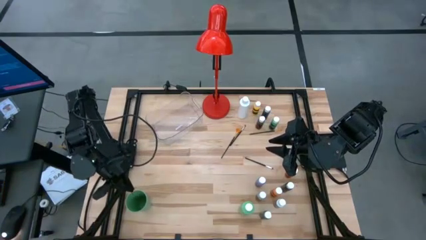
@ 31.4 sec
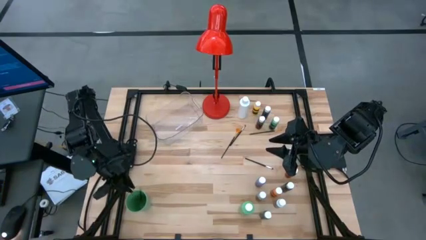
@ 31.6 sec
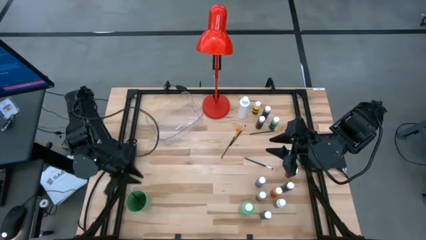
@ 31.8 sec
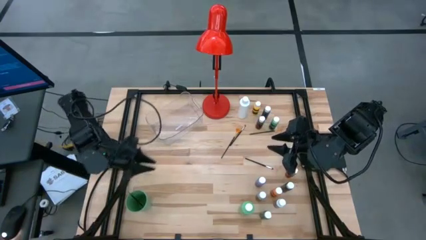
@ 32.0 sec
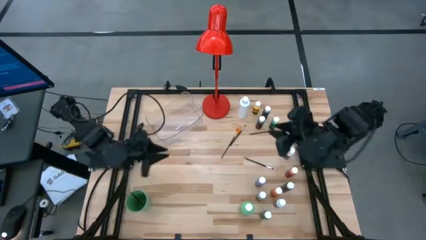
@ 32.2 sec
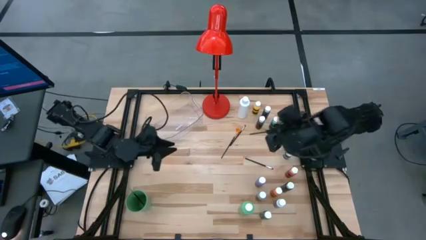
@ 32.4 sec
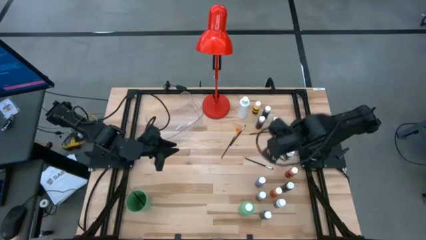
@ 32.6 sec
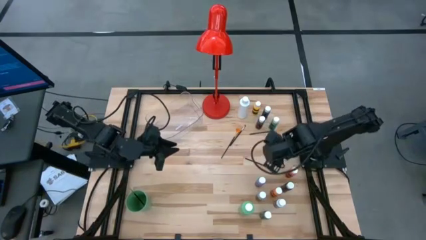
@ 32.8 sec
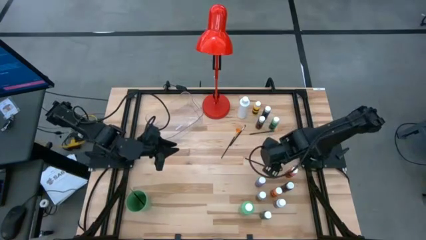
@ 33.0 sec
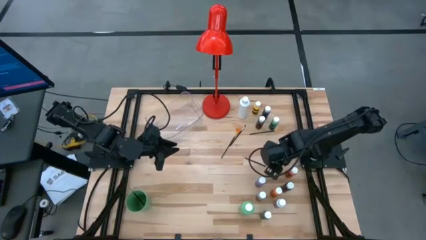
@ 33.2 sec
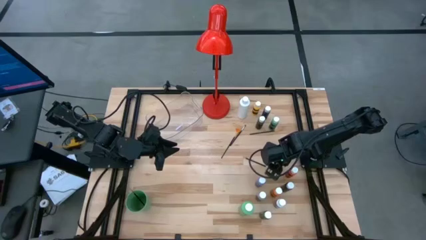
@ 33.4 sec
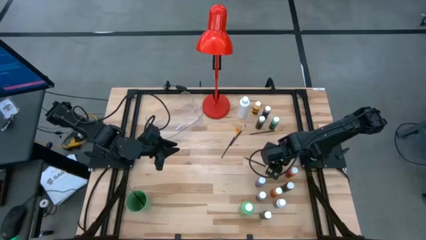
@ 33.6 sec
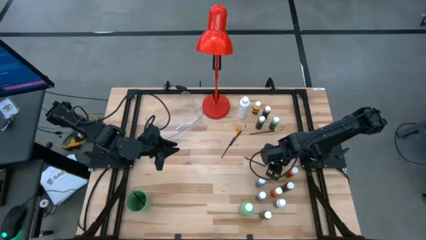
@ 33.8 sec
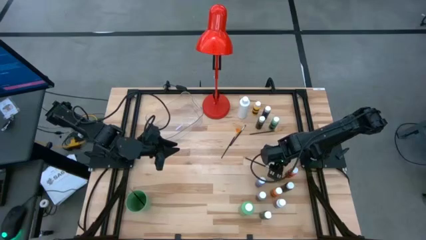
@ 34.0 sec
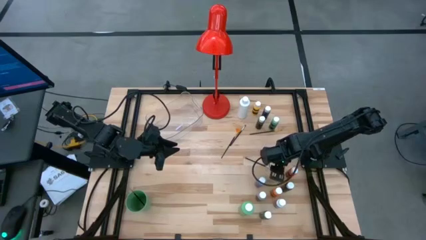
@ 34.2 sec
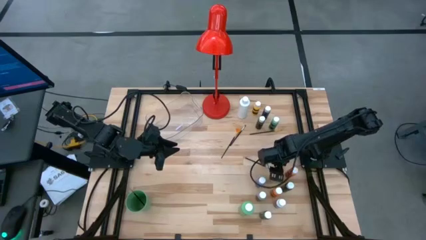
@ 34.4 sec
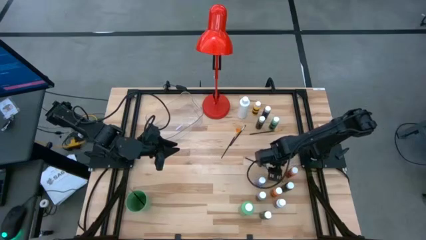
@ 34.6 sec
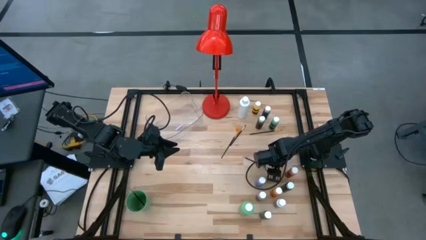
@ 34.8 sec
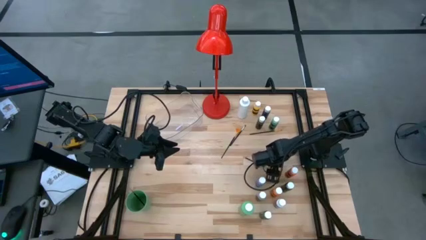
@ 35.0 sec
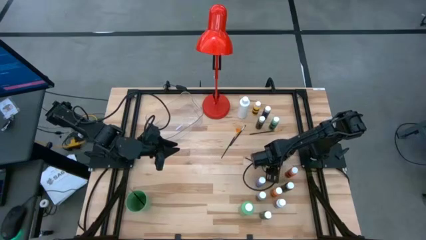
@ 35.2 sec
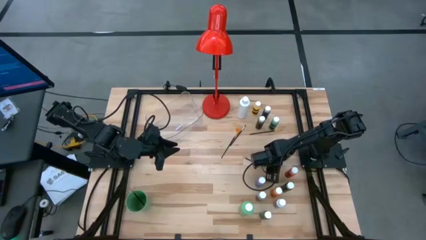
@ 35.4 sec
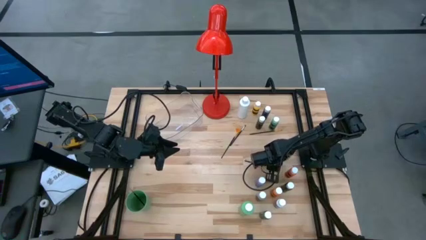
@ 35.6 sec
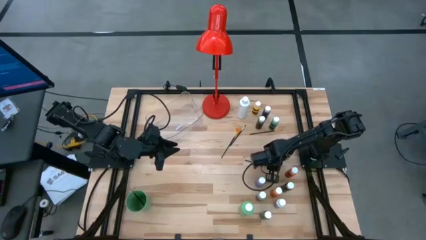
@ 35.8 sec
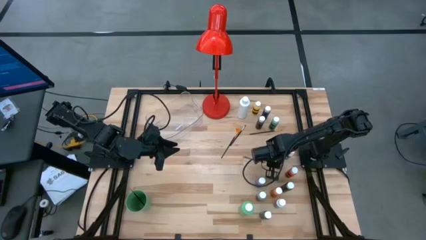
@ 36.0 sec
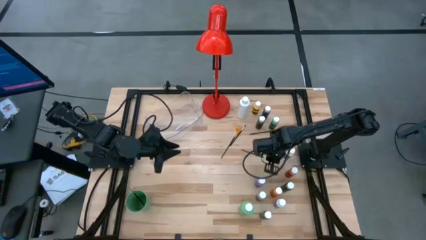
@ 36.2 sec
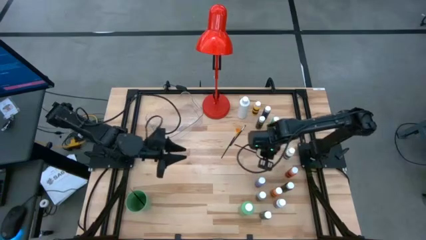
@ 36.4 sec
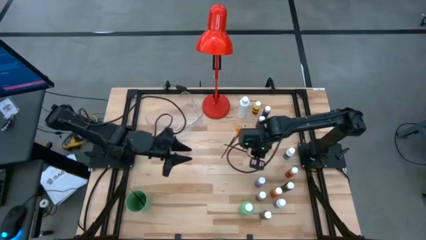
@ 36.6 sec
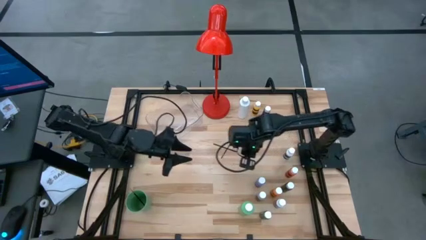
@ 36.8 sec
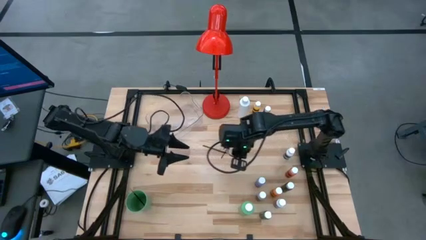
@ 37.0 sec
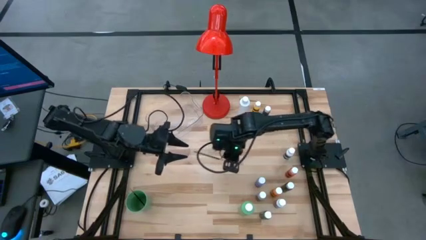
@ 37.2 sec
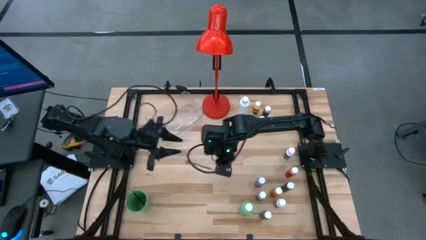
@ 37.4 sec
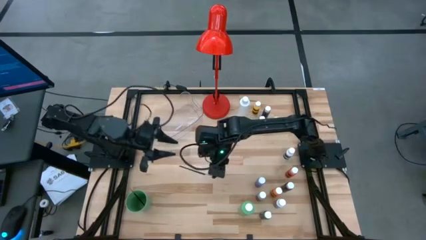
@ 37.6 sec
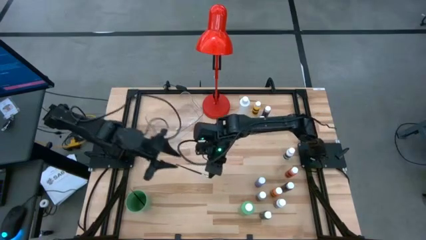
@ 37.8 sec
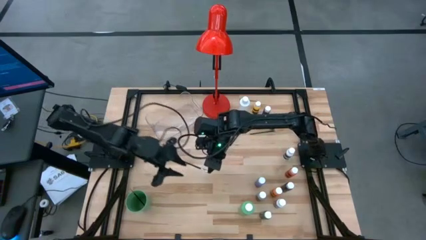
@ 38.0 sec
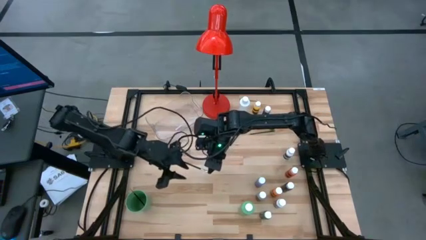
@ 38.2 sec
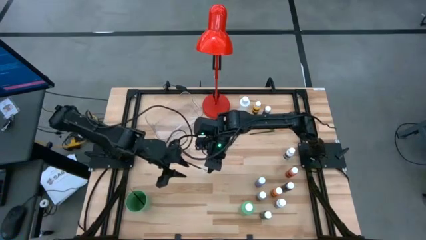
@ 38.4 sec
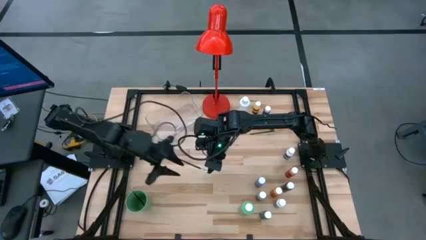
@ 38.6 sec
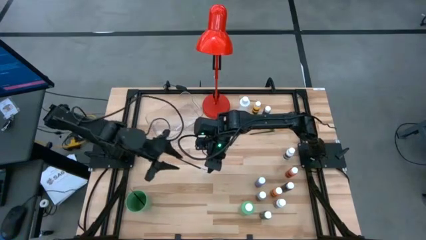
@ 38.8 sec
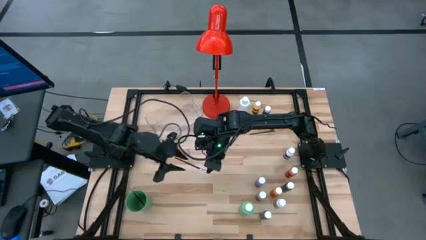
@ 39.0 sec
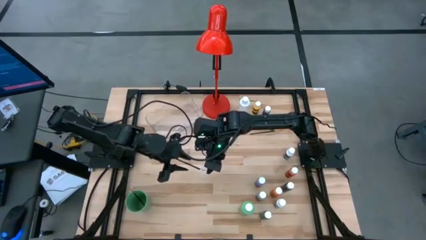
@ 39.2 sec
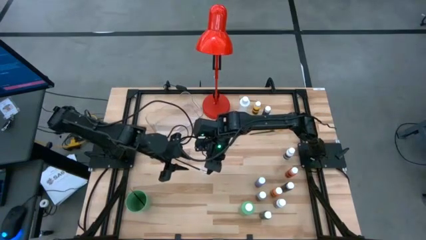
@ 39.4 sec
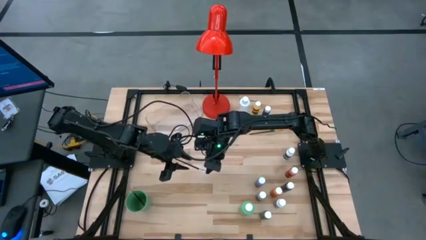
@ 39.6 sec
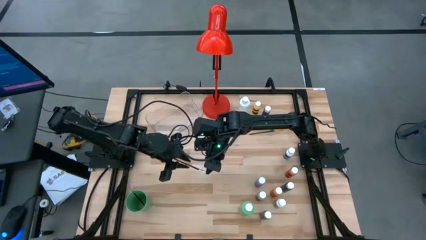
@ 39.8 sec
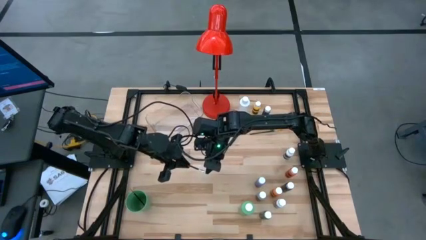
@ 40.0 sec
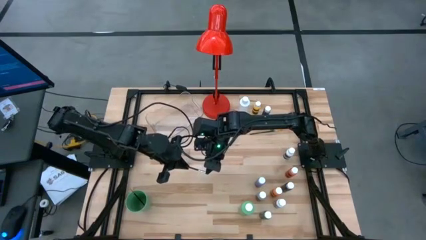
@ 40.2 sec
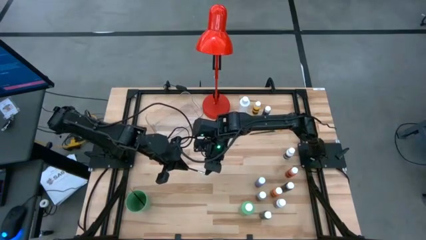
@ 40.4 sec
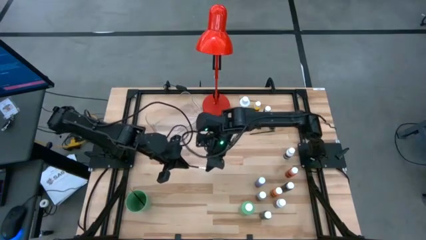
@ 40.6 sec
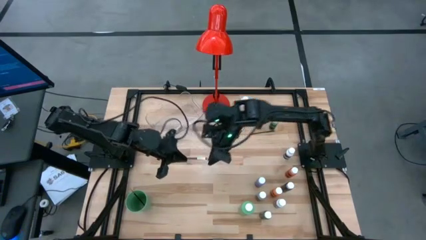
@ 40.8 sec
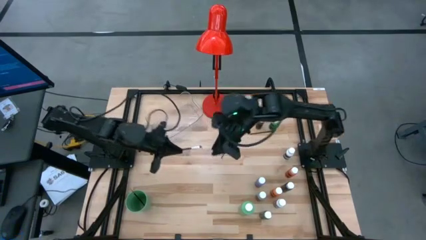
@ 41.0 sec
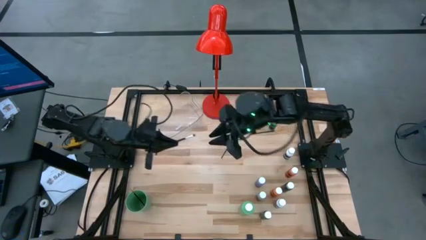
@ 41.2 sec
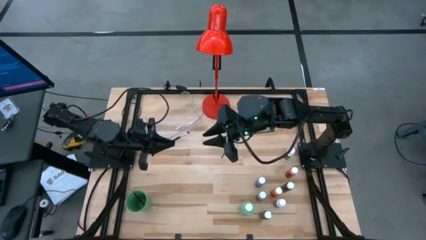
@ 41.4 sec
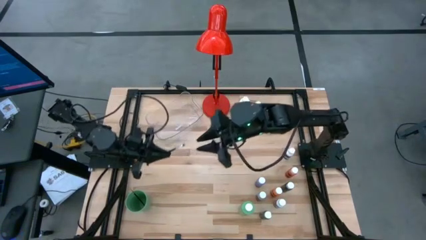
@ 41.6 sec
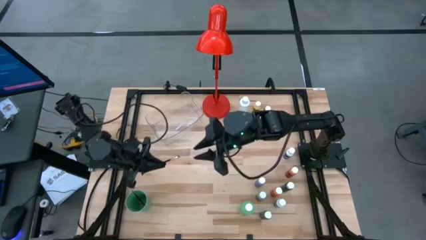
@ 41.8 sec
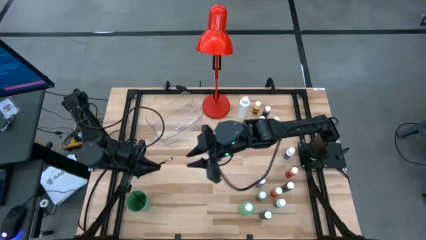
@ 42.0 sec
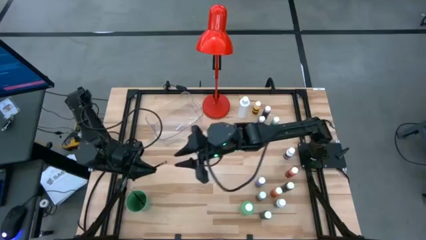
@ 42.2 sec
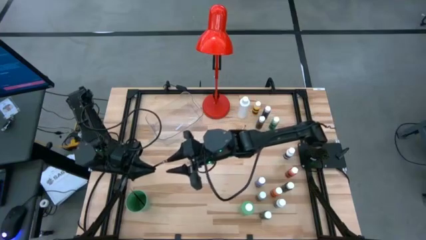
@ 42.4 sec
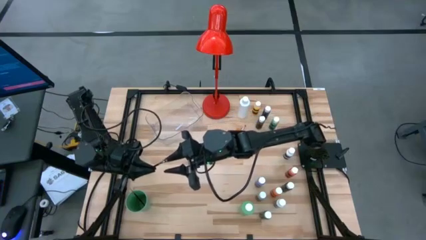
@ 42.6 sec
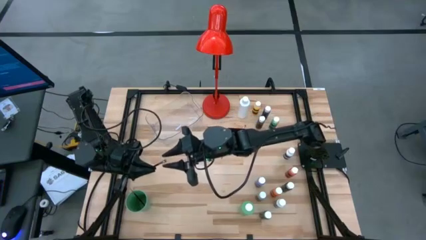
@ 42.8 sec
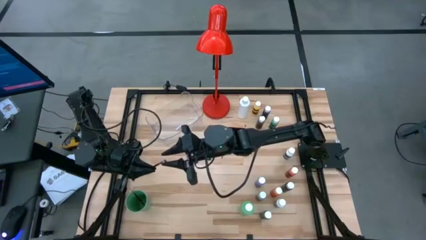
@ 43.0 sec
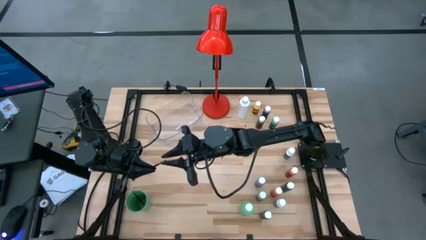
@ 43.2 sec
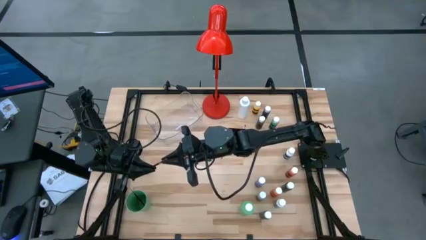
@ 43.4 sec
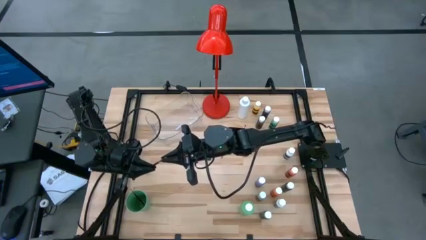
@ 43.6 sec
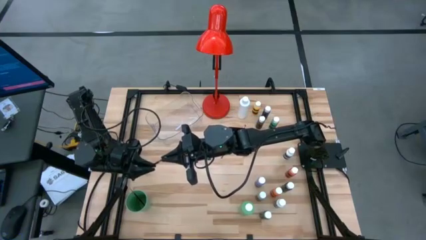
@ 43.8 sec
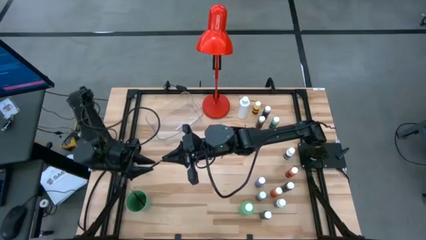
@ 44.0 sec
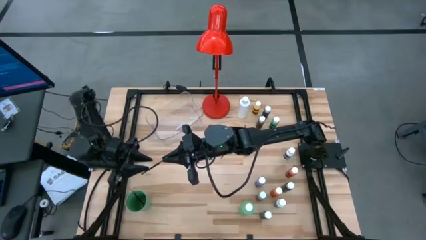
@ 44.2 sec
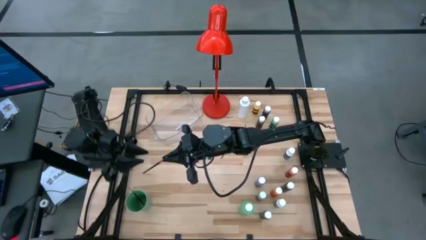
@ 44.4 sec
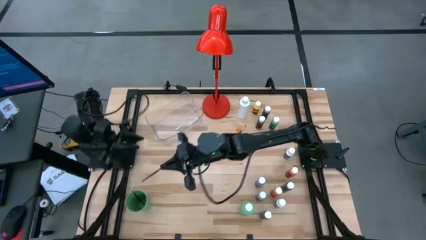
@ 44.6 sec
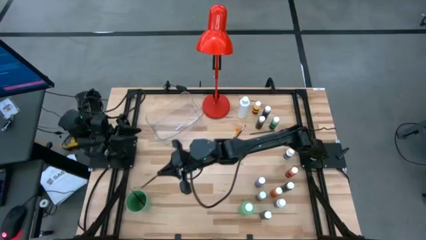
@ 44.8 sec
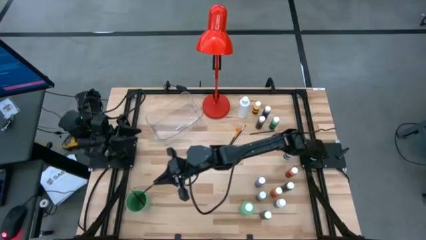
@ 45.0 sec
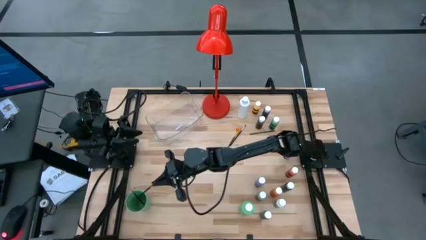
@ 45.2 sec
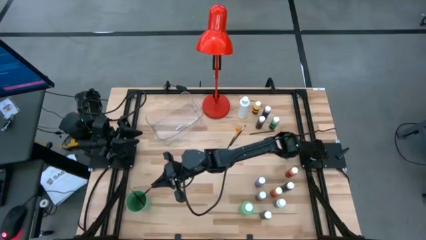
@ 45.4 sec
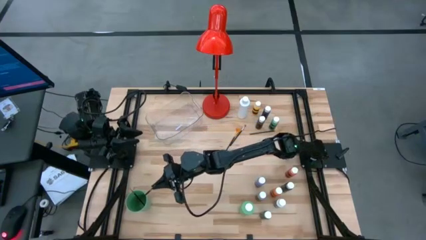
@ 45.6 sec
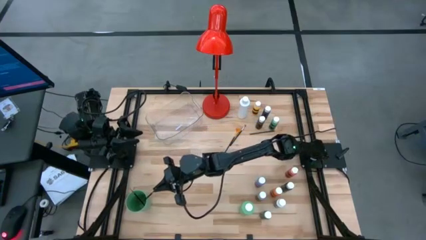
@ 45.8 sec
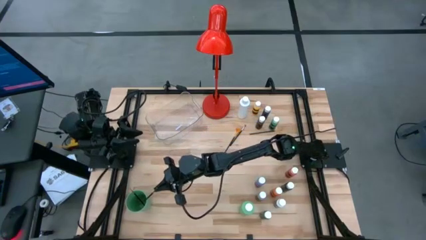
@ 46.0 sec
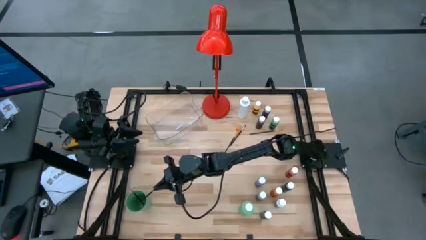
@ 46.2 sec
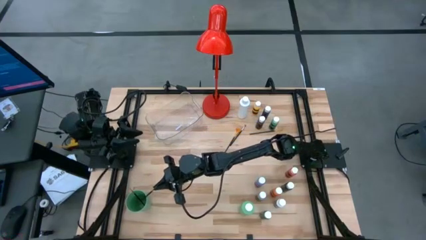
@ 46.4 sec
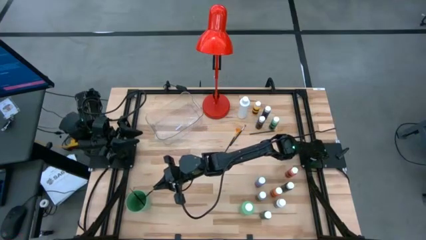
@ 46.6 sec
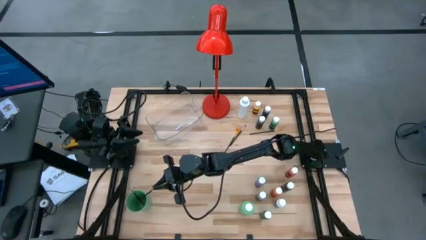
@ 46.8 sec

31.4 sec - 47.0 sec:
Task: Pick & Place Paint Supplies
Put the black brush into the green cup
